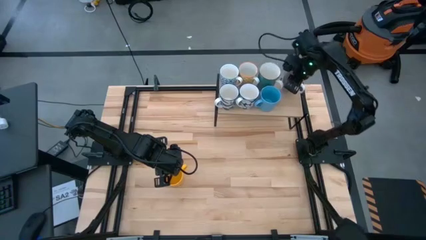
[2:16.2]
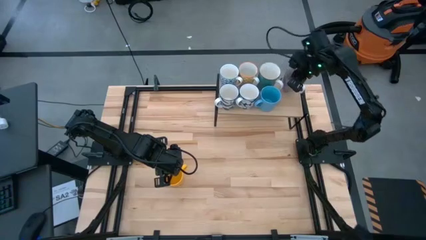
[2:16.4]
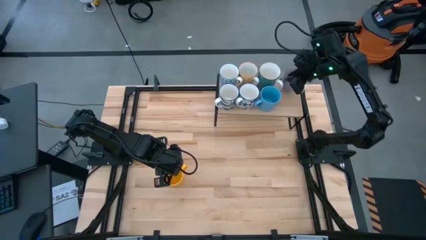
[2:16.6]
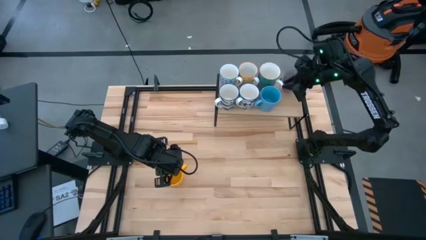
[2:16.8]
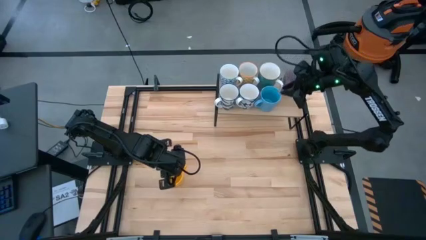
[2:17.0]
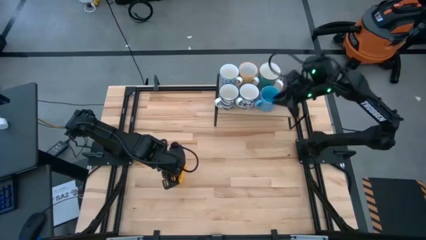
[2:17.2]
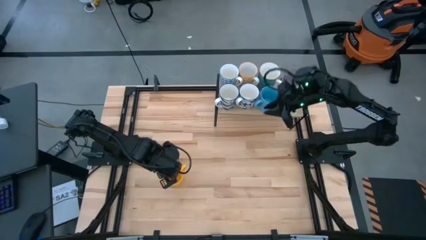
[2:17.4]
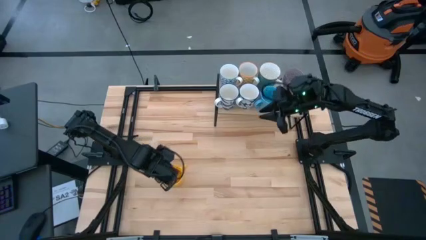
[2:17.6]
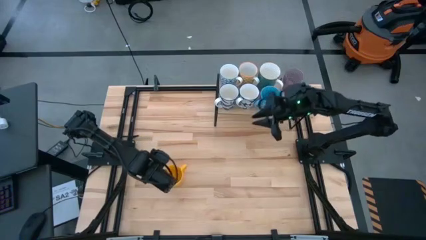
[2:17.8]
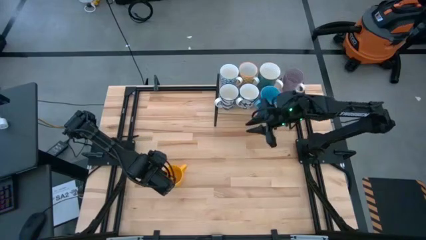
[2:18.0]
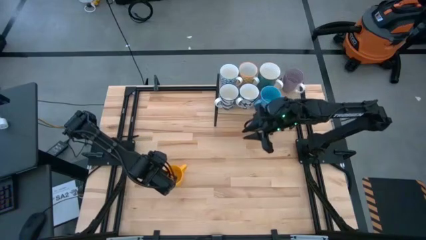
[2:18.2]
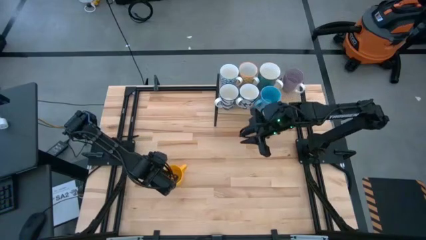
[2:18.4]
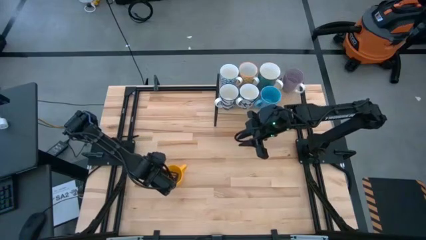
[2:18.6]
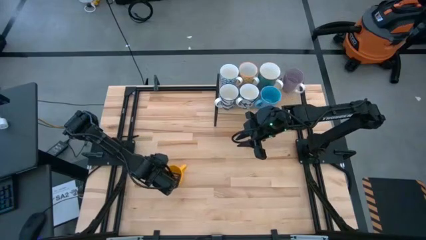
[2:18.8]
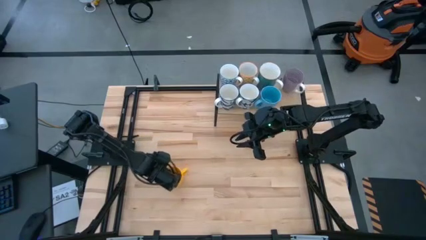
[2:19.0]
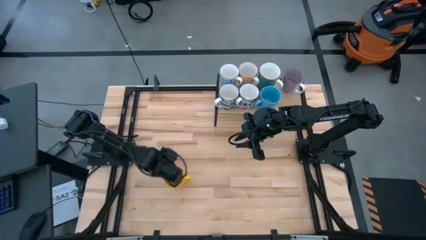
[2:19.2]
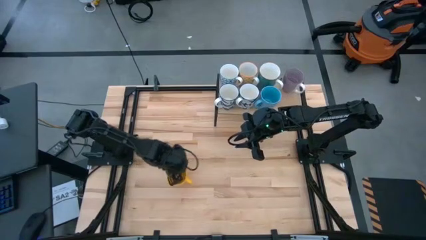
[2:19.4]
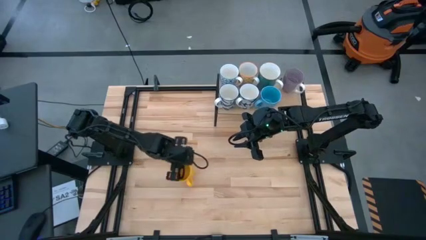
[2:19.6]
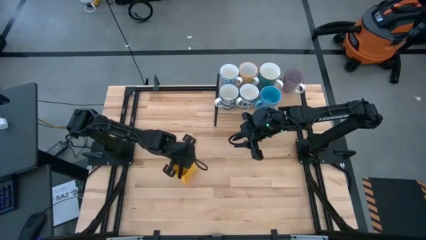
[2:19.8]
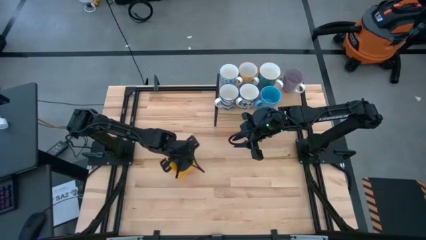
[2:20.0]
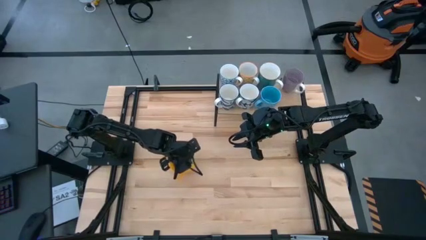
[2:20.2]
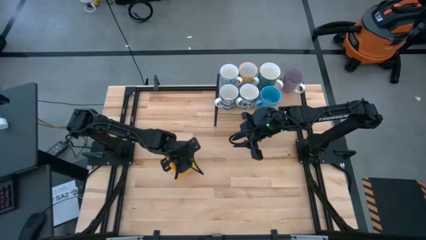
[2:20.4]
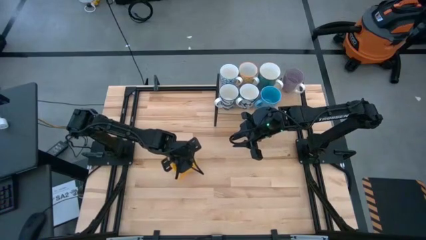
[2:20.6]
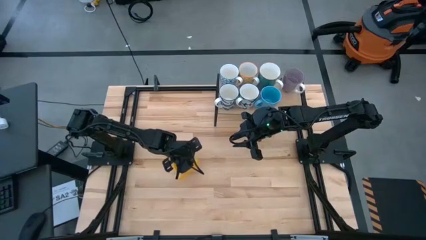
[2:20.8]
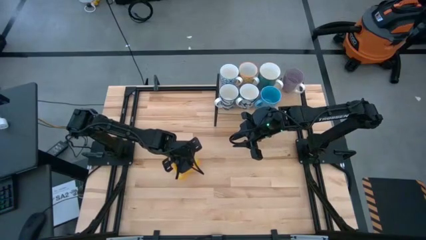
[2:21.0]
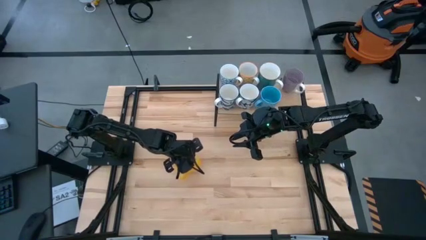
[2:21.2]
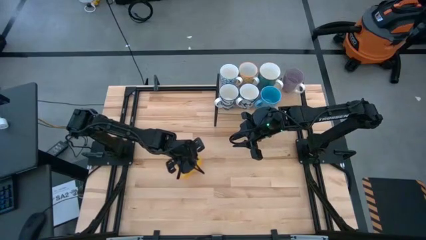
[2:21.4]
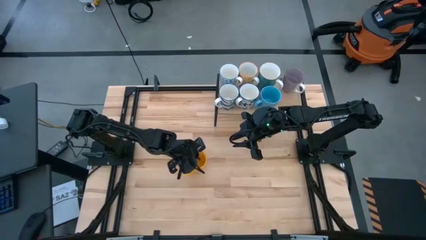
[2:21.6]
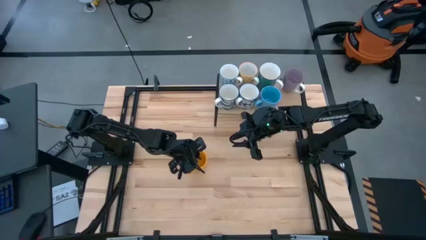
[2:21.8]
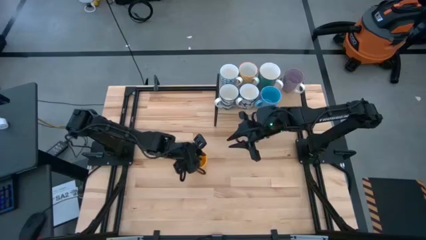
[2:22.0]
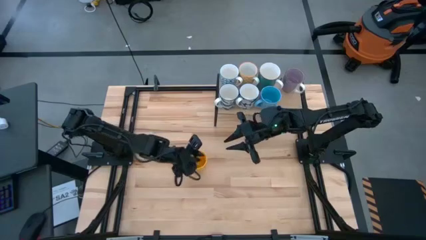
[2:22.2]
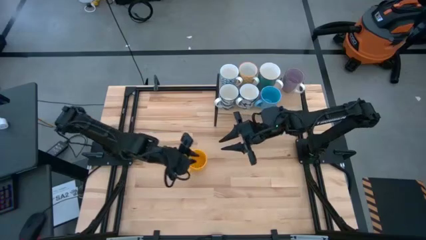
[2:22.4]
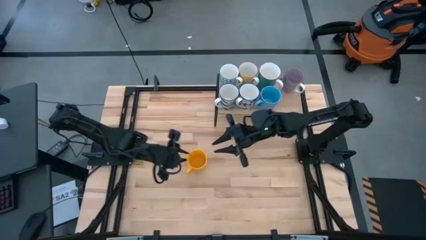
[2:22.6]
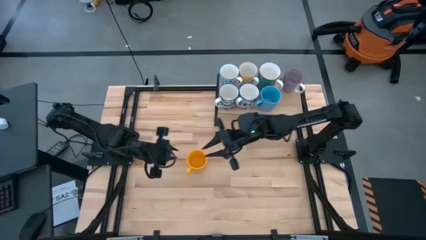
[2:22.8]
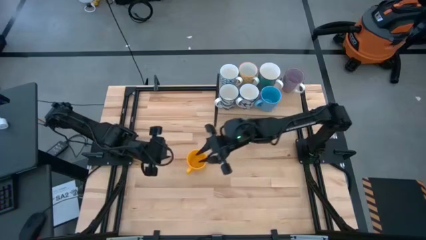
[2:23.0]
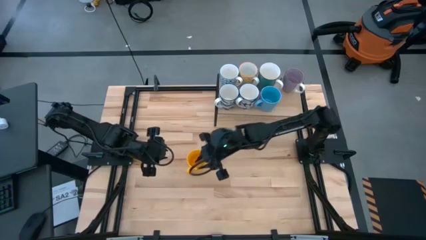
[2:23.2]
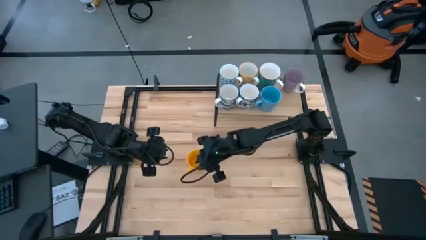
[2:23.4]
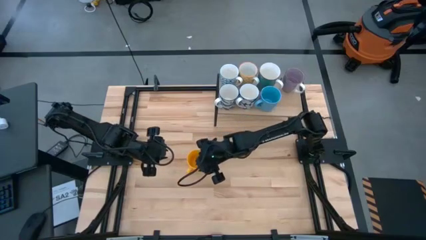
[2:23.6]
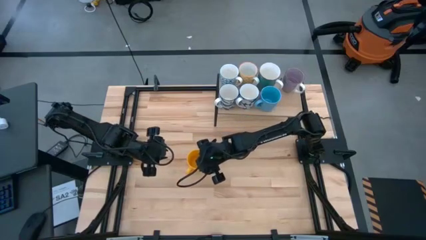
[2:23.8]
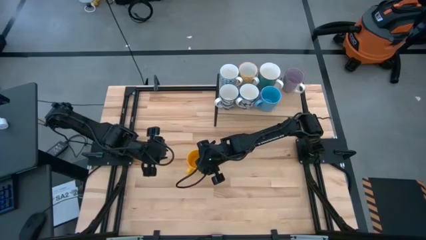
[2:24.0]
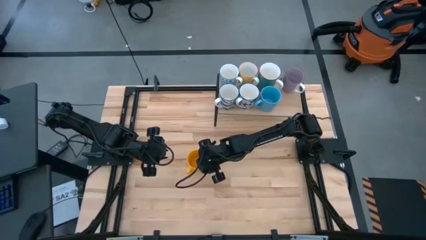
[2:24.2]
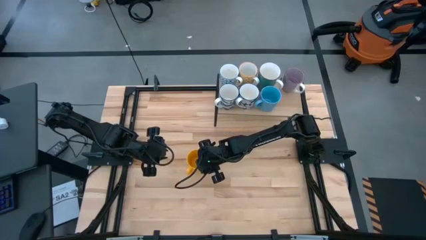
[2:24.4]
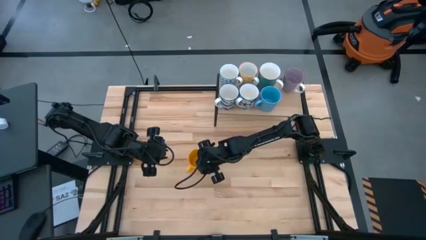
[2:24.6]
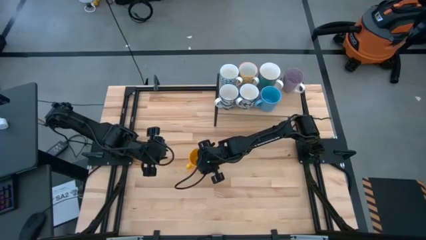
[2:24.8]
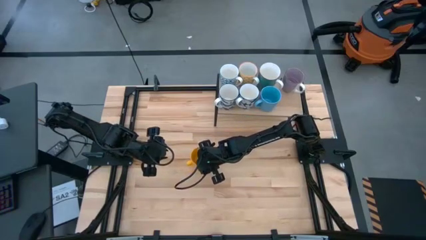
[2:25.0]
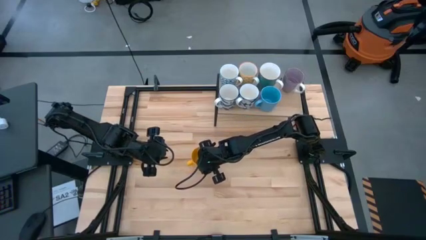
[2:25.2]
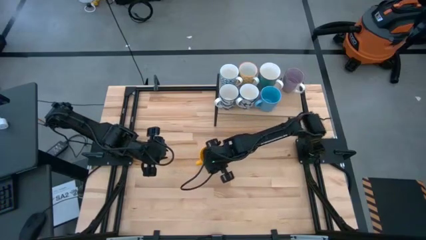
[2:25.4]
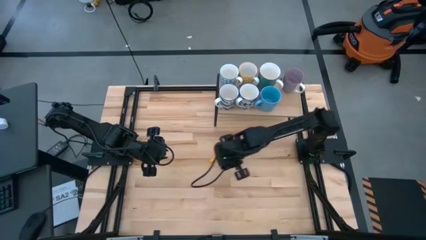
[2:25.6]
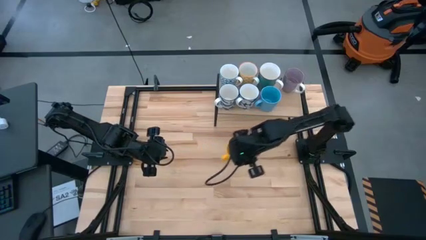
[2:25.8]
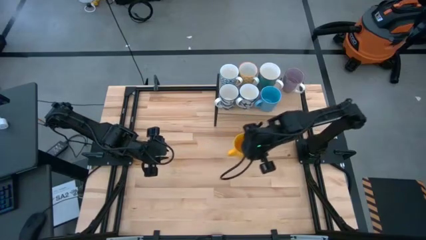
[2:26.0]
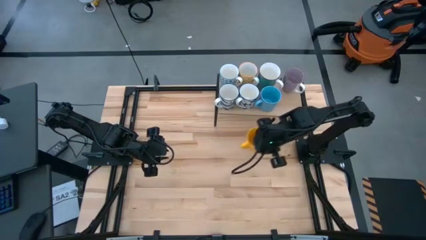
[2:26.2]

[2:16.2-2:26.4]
Task: Place coffee mugs
Put the yellow mug on the shelf

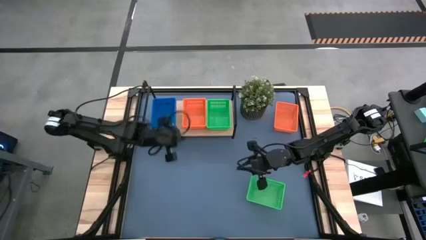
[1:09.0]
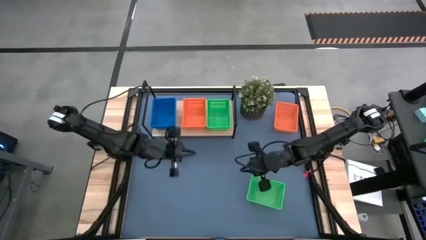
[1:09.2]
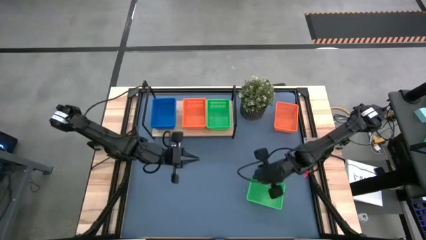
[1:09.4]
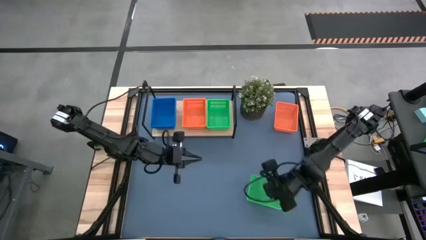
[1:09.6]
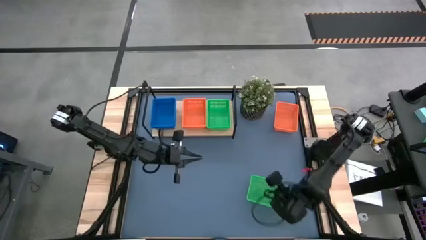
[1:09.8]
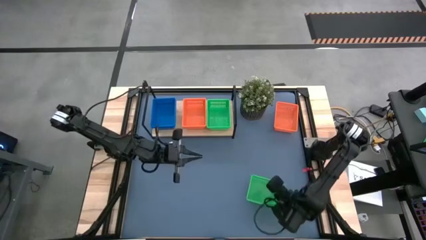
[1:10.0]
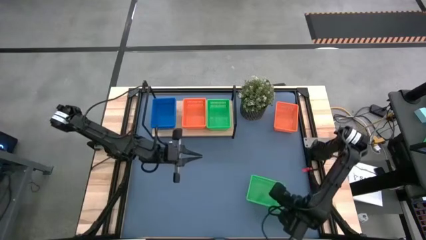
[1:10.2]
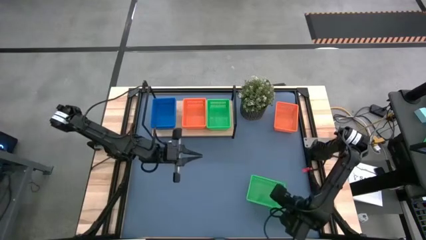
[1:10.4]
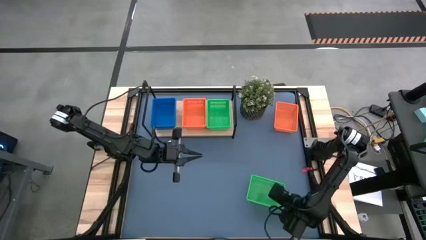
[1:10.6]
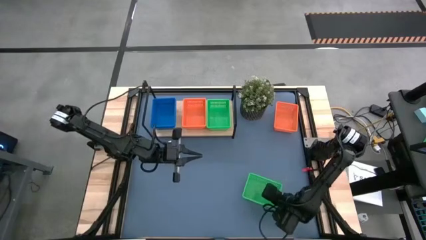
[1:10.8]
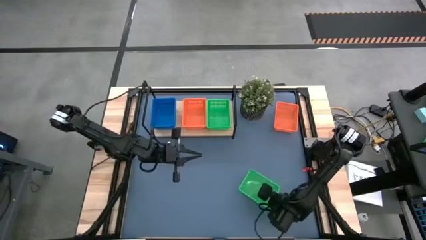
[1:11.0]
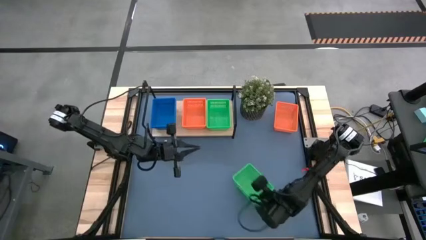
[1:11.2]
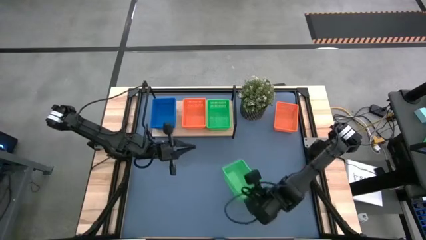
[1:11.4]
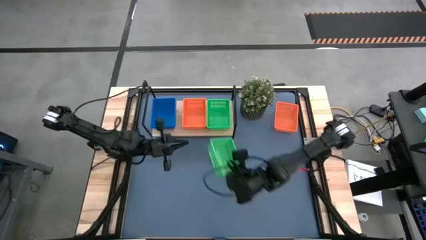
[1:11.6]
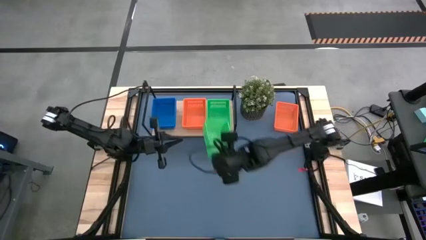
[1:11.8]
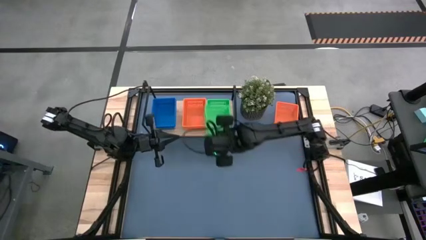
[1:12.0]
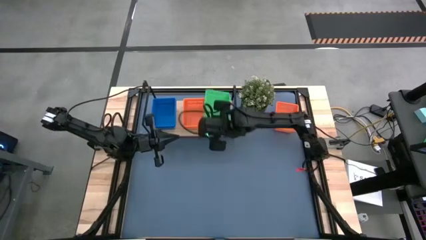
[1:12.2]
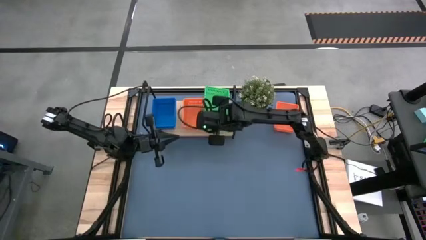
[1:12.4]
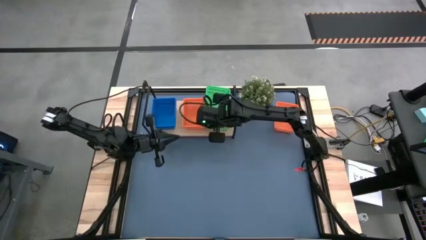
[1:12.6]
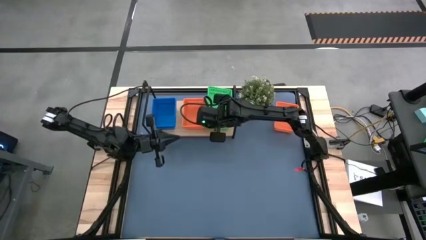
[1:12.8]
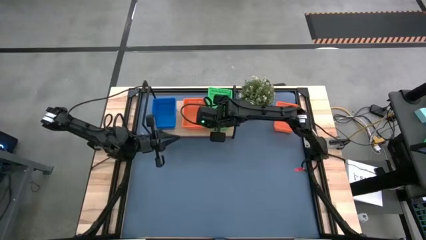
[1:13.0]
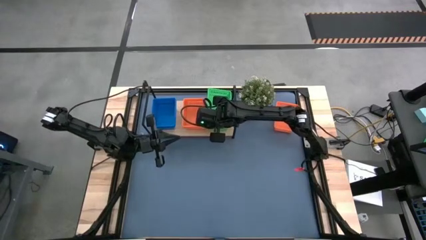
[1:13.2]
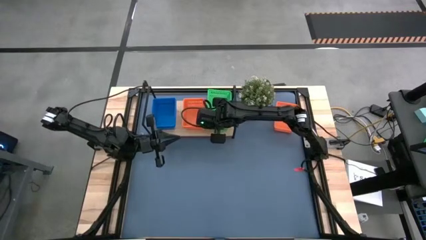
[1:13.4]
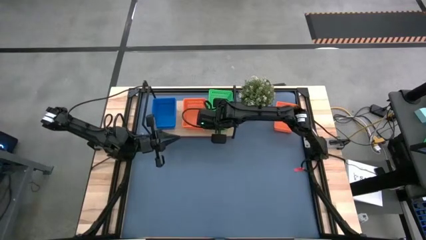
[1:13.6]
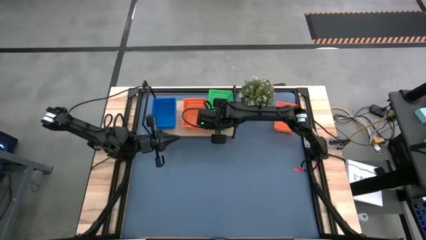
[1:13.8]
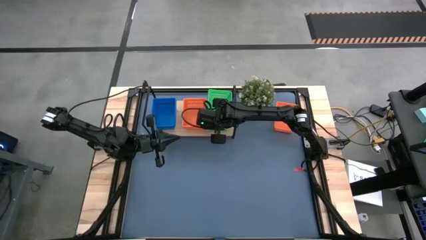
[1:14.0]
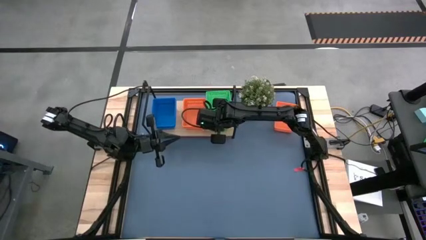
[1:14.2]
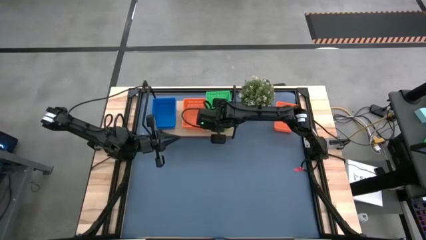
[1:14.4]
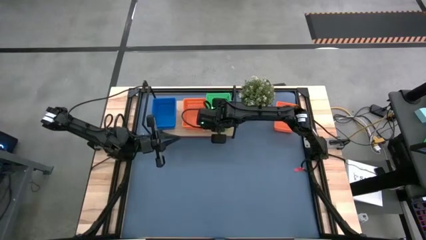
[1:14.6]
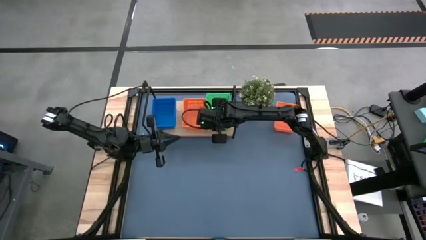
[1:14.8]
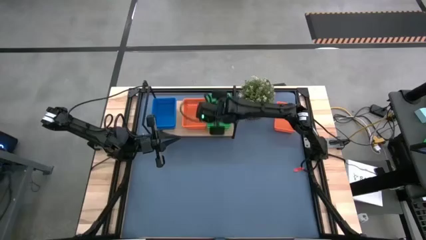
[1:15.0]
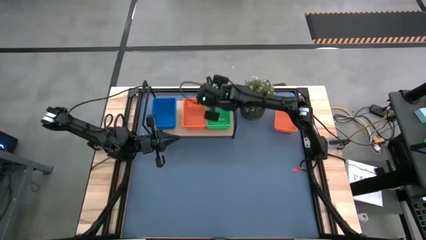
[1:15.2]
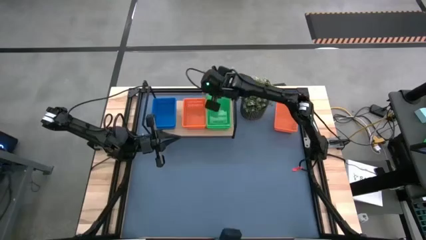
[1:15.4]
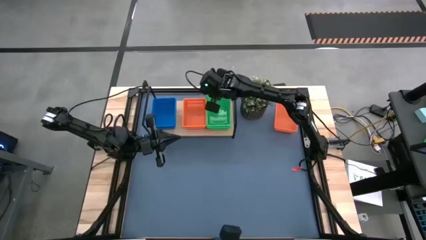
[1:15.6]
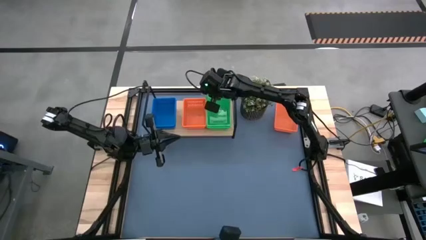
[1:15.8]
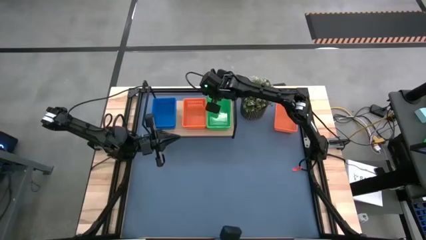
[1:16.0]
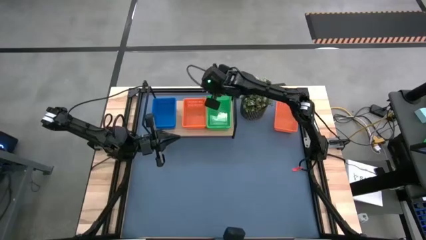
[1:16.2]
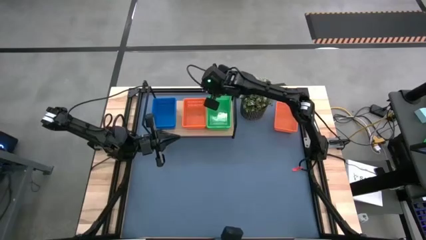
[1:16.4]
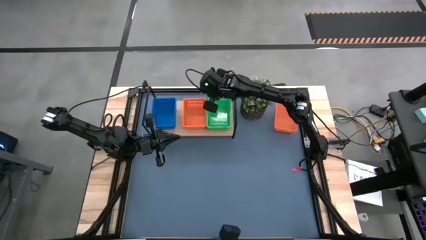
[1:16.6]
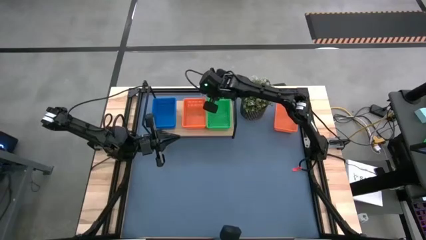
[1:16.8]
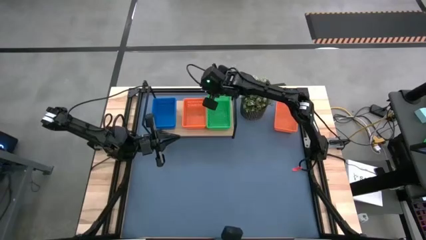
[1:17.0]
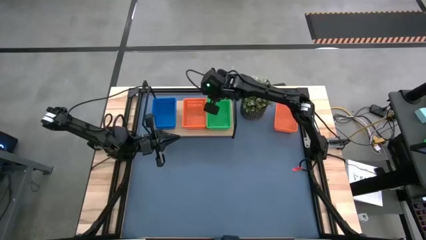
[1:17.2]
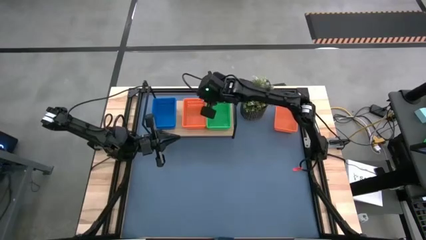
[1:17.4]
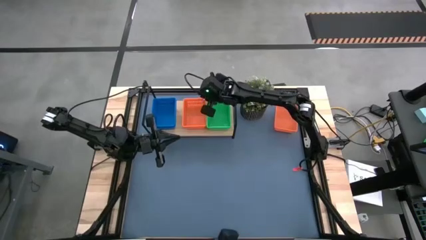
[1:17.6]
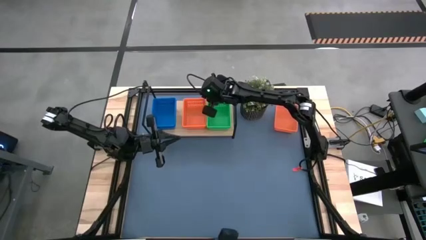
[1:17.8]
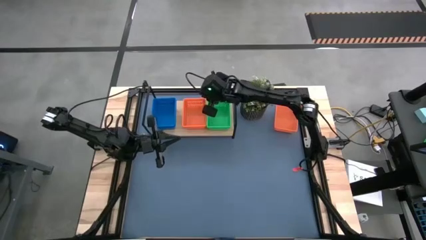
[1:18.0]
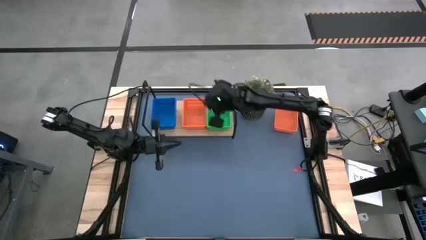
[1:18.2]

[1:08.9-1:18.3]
Task: Stack baskets on shelf by color
Stack the green bin on top of the green bin on the shelf
